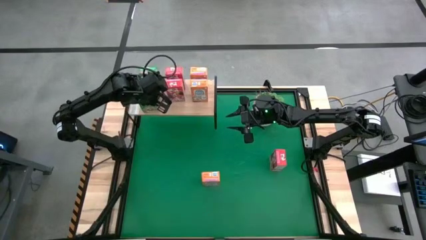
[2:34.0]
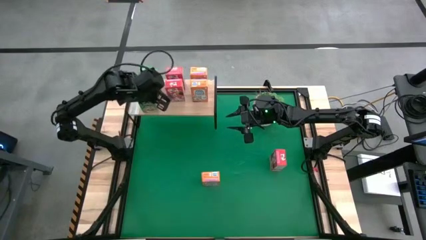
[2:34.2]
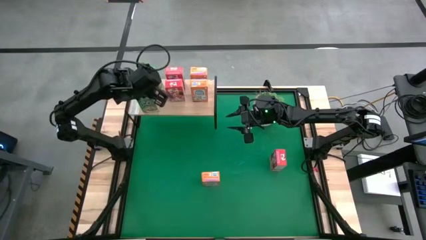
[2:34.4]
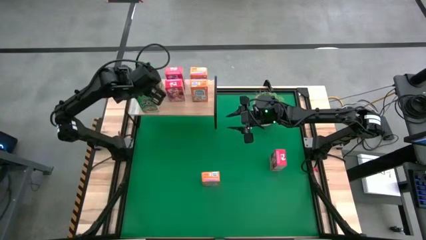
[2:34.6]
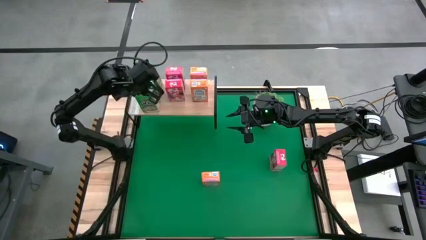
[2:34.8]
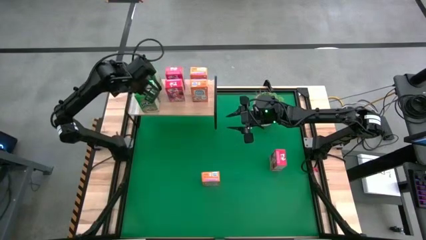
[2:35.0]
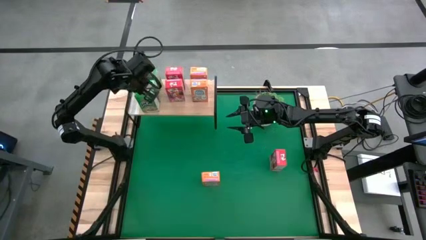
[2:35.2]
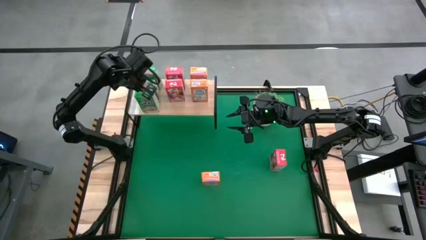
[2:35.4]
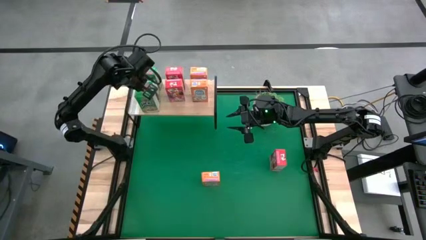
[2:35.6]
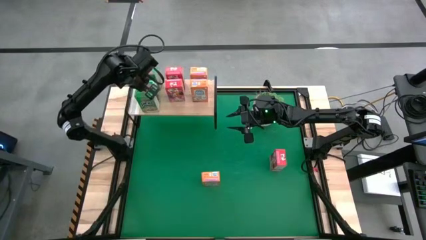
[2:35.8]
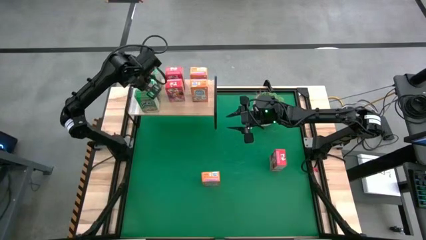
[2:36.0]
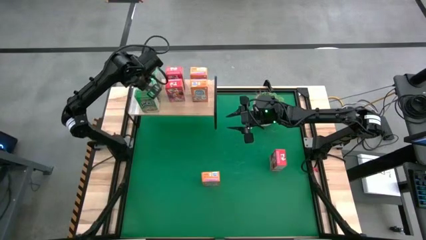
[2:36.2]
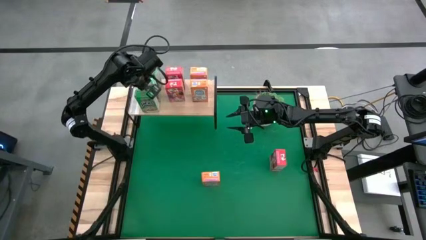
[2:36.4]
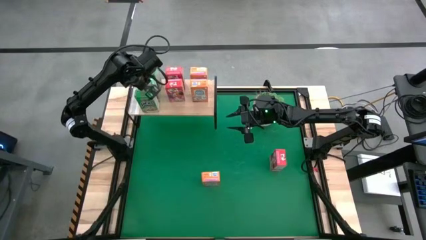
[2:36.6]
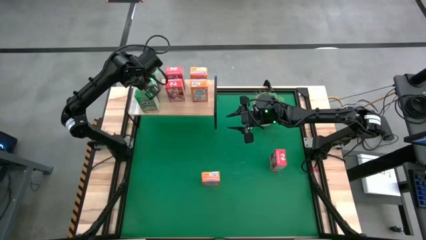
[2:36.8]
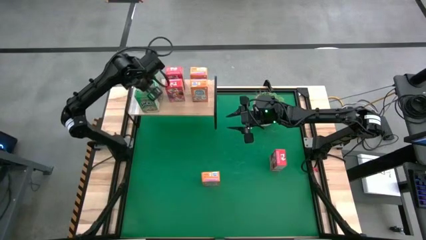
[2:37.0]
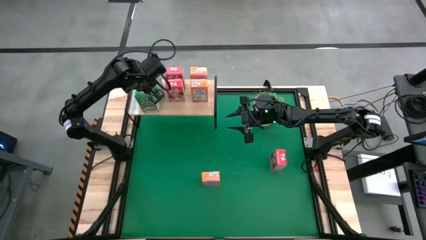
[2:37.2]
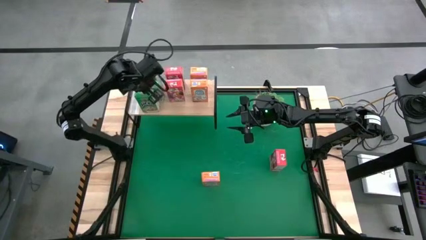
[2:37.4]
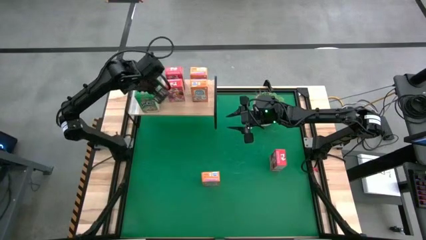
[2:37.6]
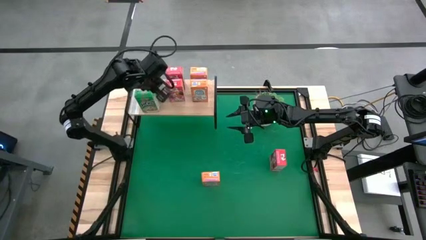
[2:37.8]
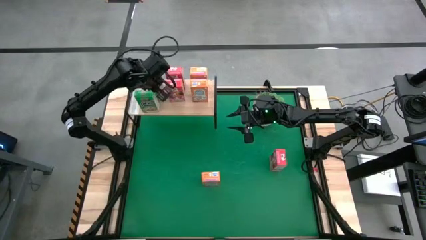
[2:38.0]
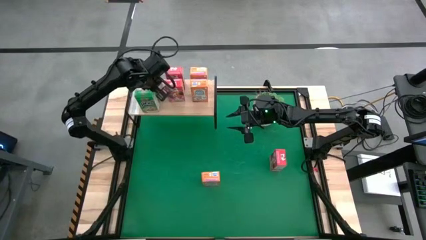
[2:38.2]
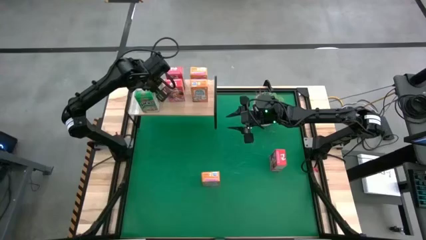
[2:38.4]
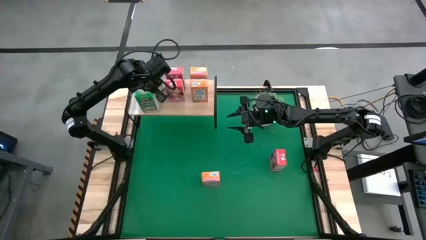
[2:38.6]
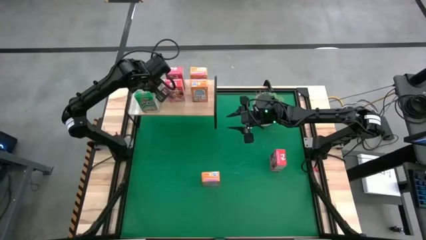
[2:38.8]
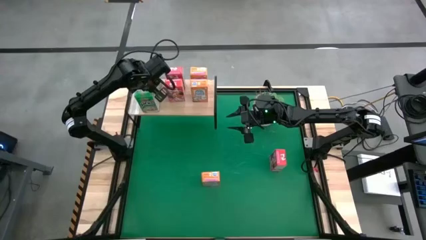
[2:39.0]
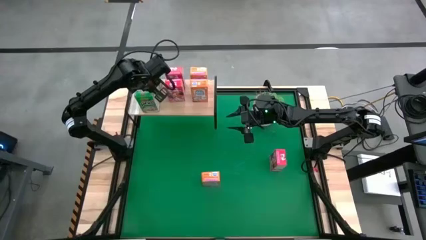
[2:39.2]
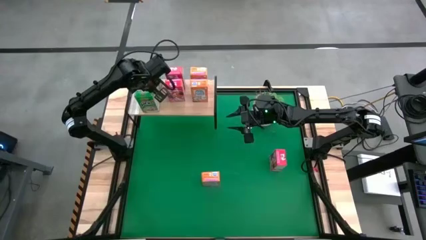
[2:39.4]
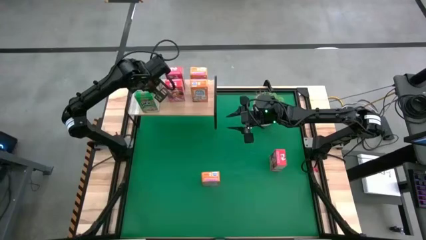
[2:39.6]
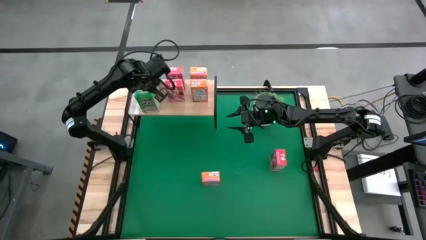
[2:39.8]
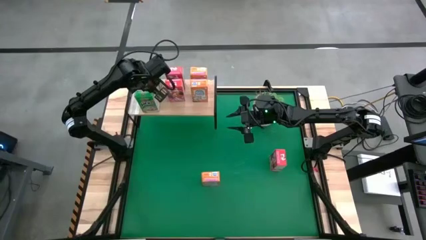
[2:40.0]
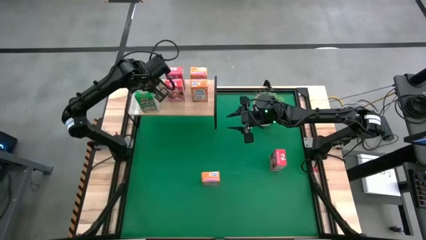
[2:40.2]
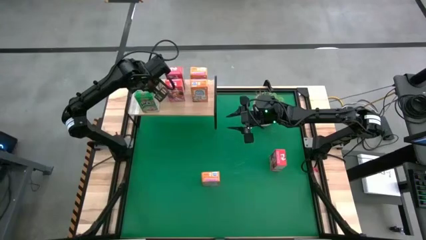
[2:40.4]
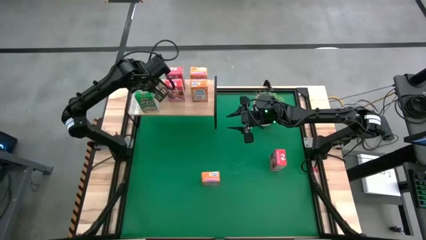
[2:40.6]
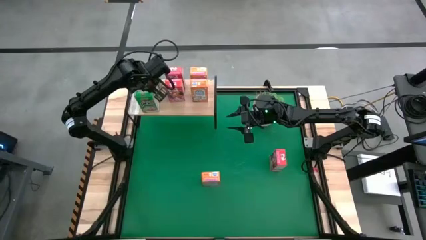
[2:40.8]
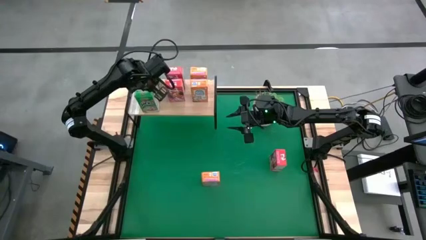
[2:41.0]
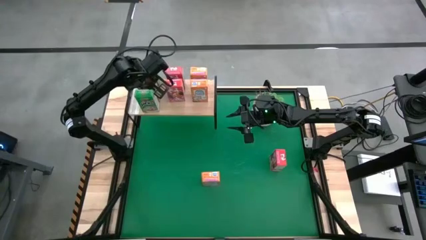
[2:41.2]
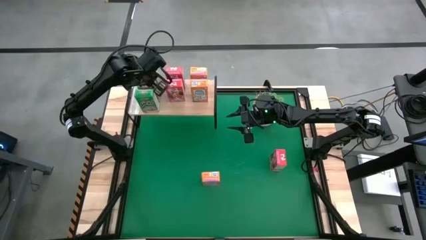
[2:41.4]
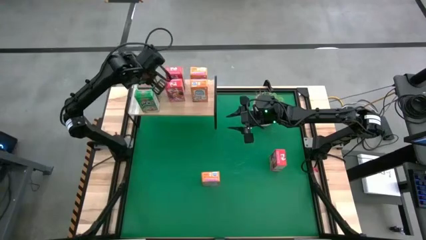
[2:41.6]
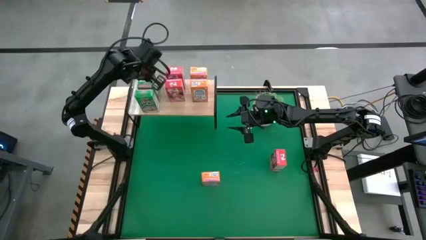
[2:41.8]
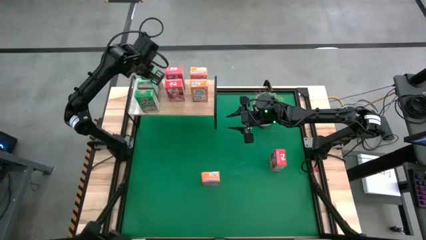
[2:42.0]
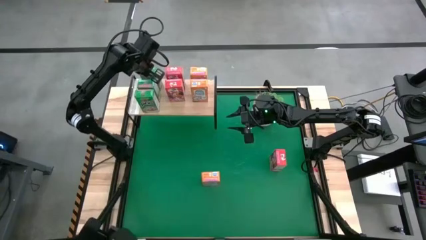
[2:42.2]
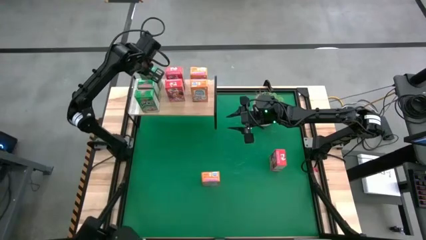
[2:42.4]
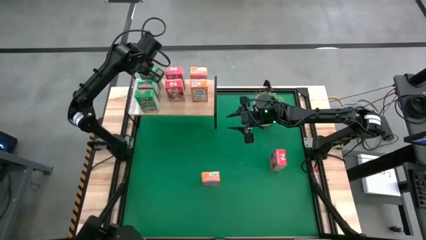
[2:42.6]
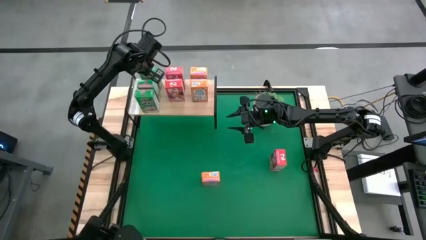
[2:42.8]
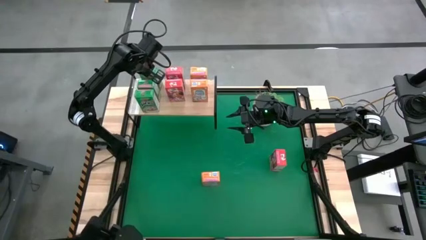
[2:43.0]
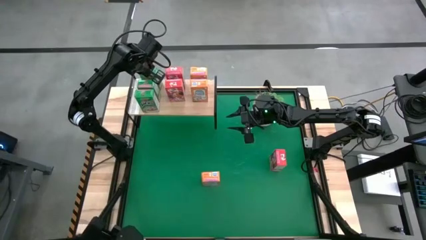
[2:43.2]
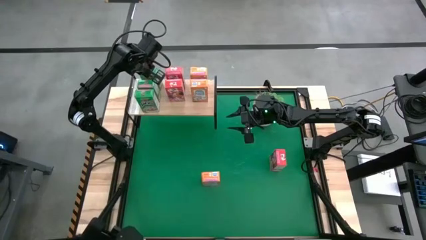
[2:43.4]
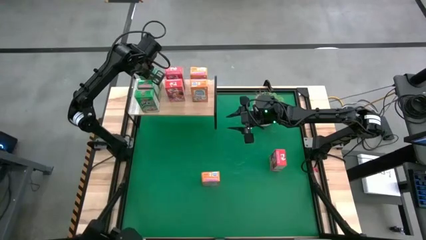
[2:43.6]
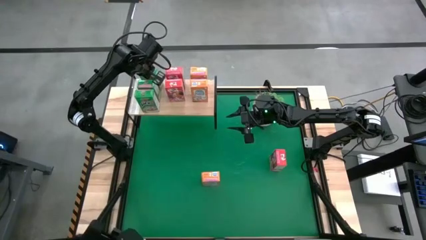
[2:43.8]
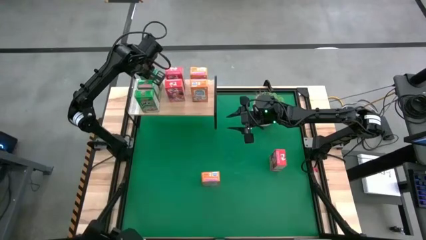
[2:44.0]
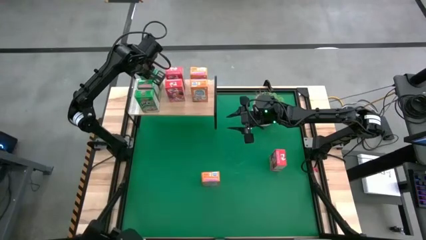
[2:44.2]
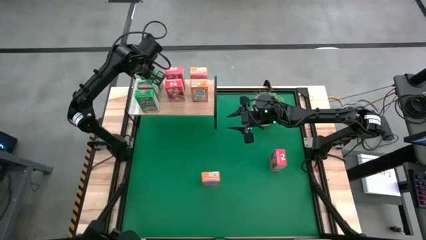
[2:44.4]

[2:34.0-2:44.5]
Task: Stack cereal on shelf
Adjust the green cereal boxes on the shelf

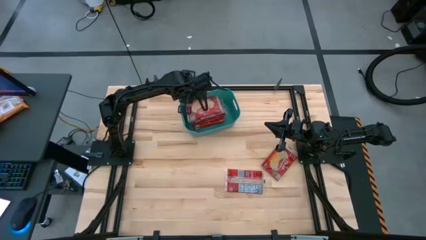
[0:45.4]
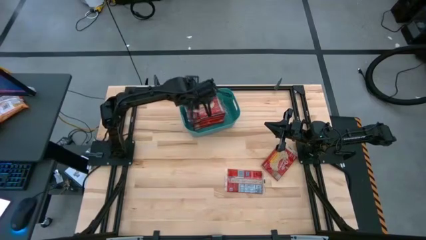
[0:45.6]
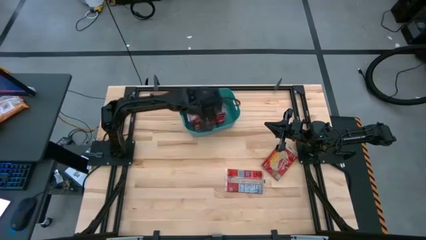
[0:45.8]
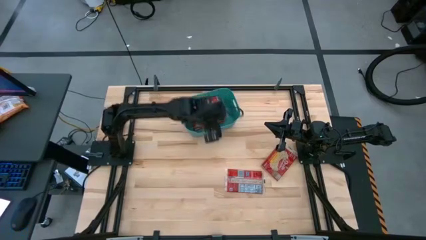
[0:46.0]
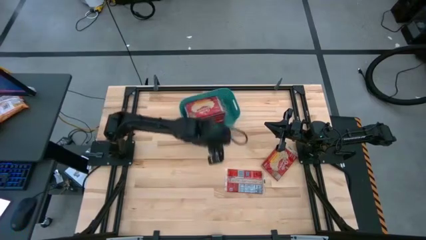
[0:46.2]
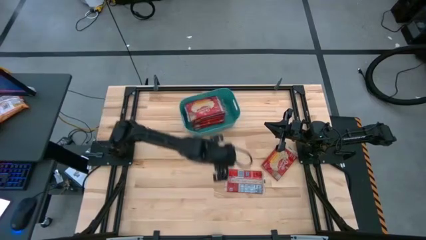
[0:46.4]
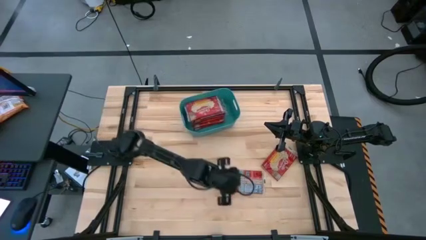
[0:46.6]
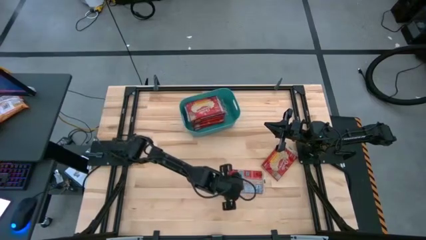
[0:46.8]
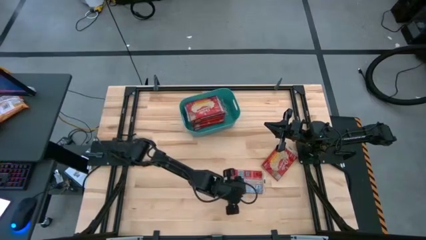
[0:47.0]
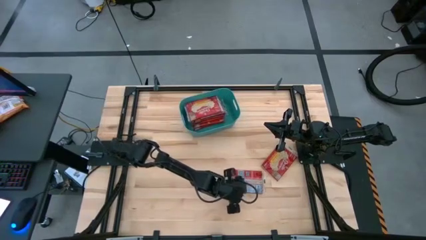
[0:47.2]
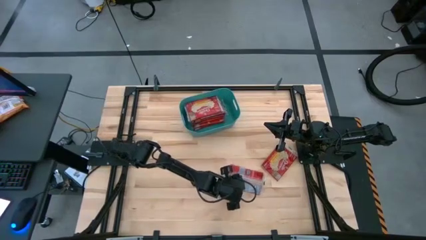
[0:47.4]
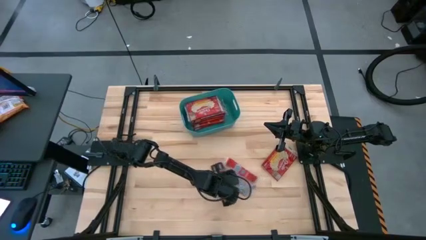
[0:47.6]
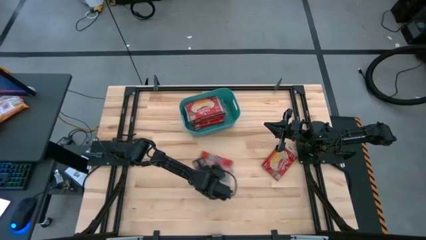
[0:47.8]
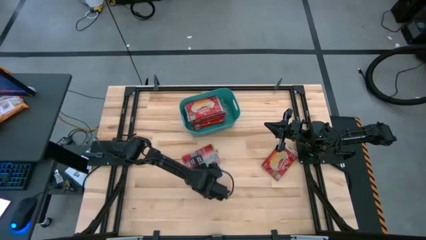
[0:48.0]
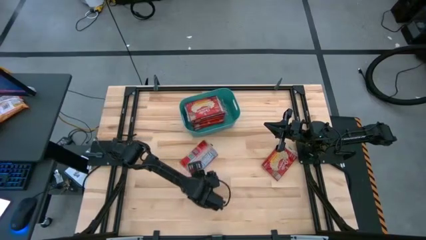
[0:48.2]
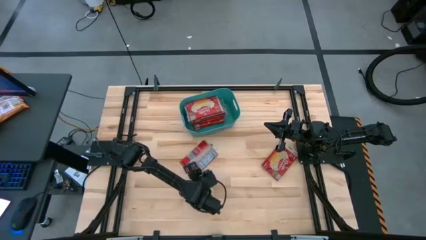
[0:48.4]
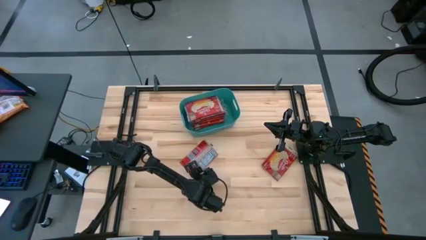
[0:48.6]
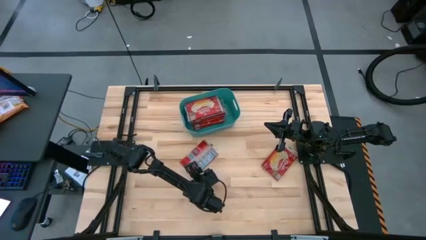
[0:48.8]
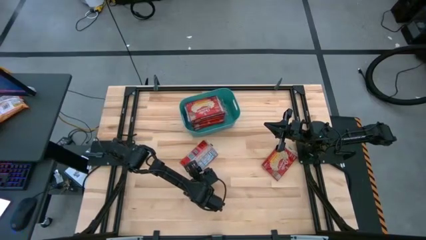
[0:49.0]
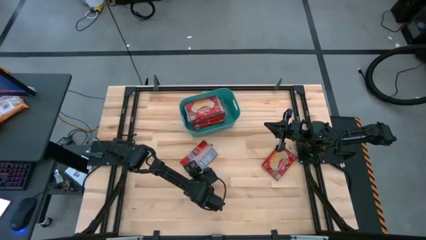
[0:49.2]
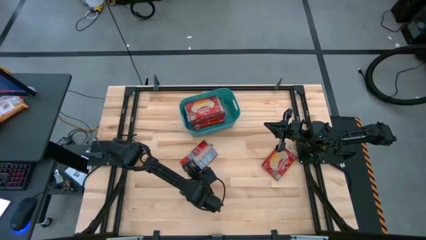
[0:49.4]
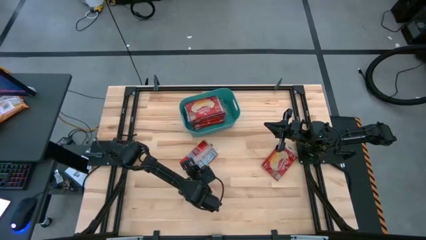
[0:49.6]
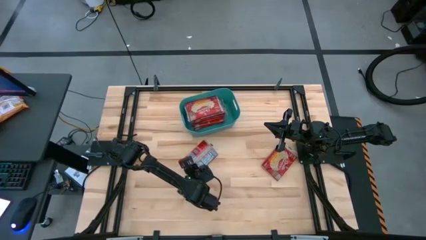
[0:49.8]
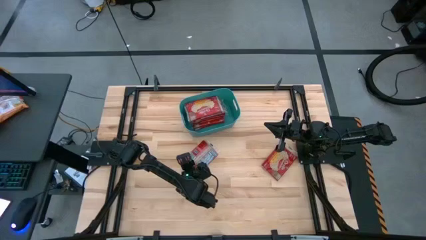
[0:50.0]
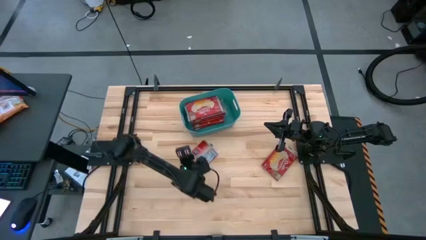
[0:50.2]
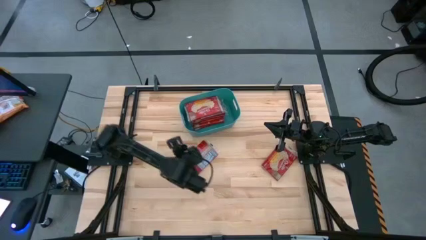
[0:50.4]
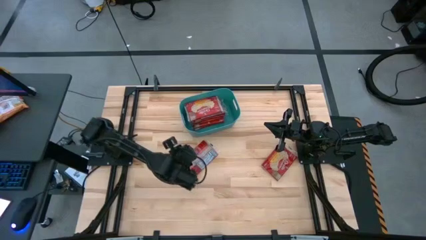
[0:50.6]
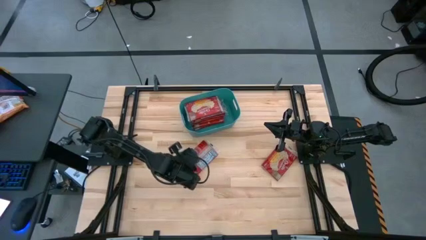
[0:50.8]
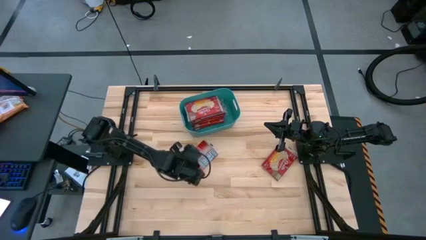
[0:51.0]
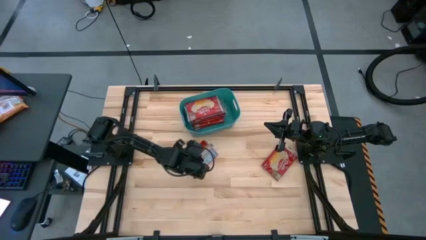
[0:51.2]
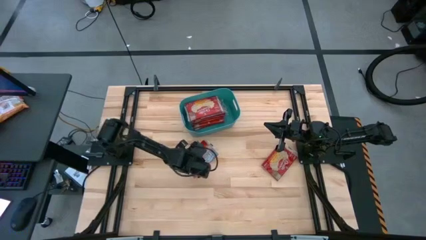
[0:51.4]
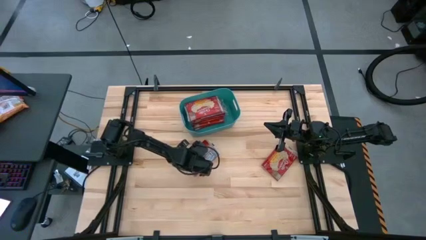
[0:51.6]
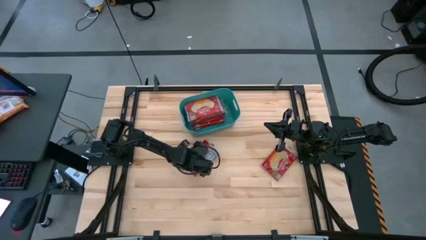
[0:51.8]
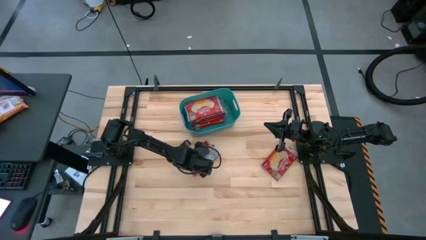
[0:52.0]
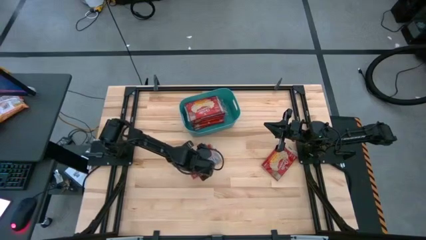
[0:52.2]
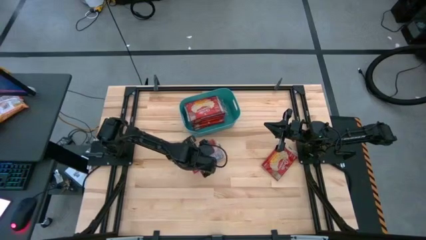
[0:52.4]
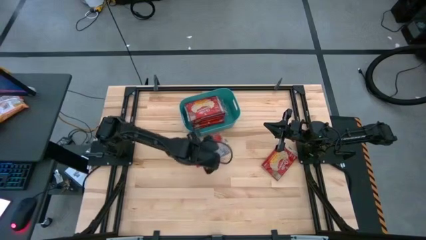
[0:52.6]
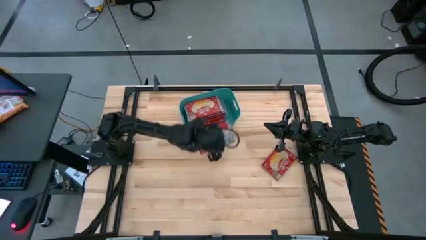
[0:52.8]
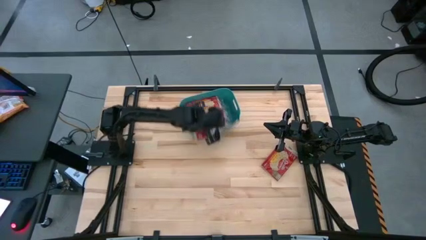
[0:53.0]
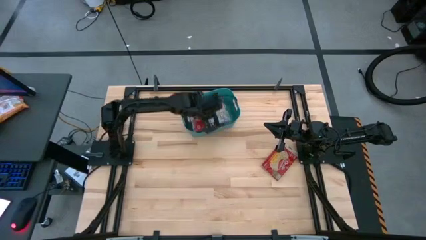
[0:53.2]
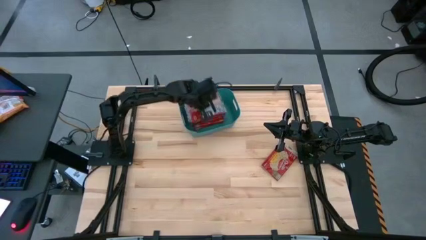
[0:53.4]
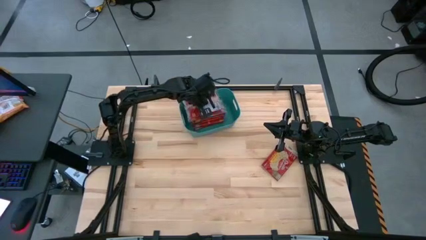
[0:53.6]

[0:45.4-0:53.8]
Task: Sort popcorn bags into baskets
Put the bottom red popcorn bag into the green bin
